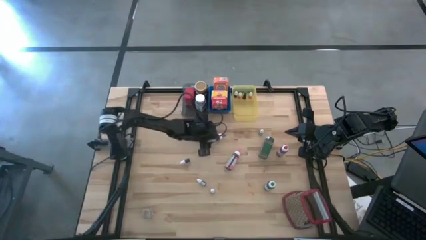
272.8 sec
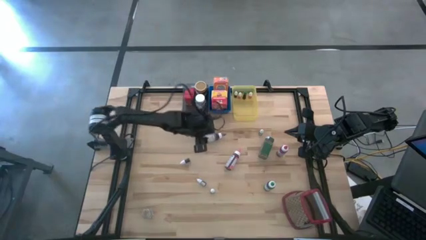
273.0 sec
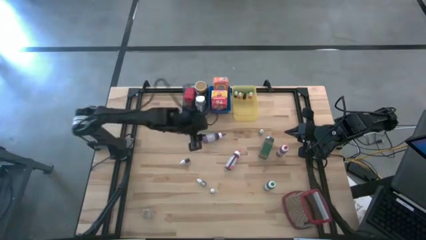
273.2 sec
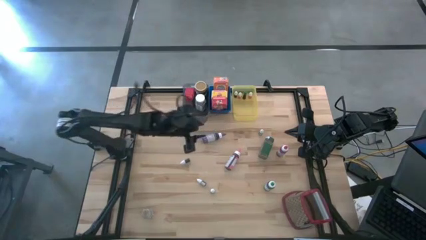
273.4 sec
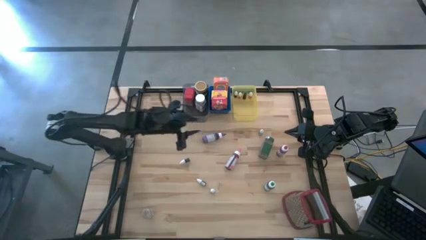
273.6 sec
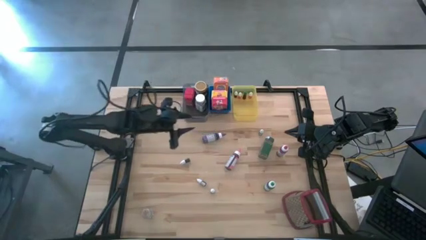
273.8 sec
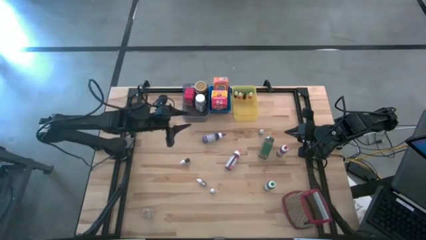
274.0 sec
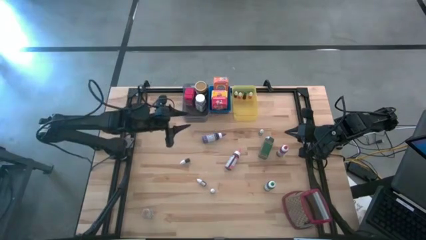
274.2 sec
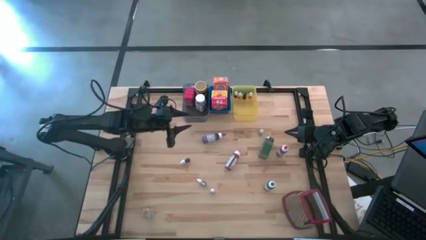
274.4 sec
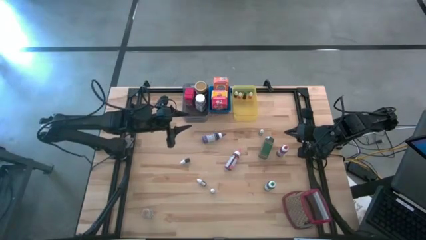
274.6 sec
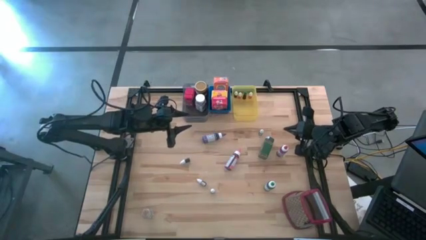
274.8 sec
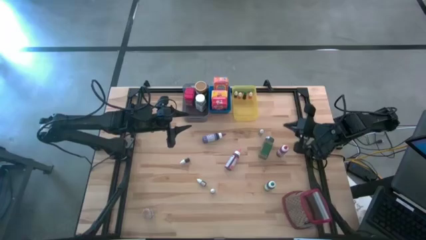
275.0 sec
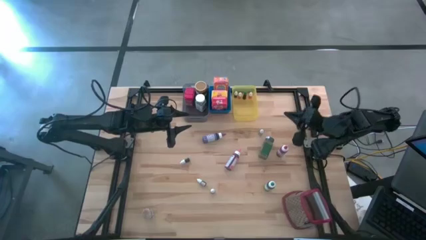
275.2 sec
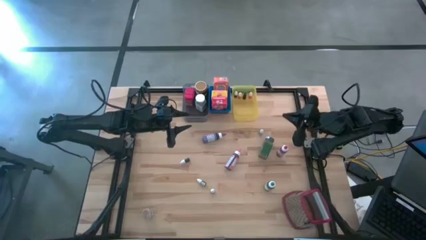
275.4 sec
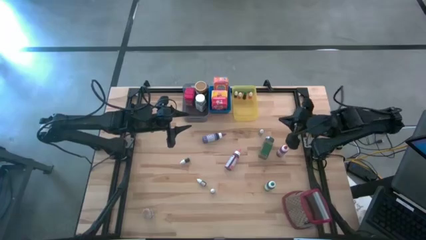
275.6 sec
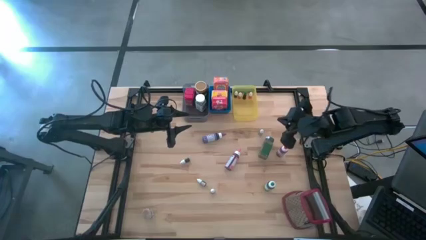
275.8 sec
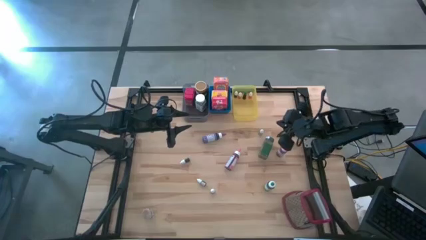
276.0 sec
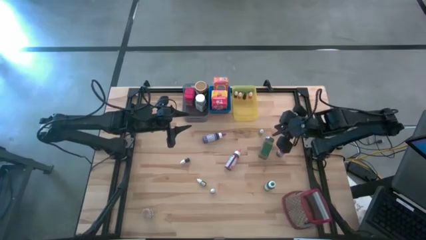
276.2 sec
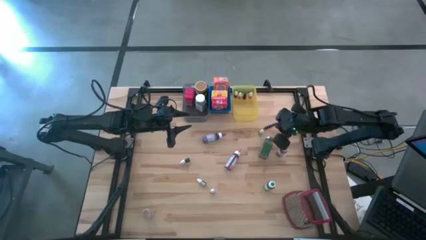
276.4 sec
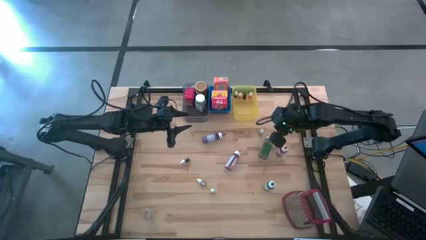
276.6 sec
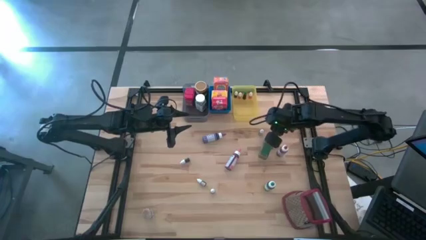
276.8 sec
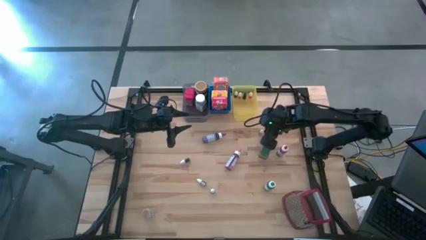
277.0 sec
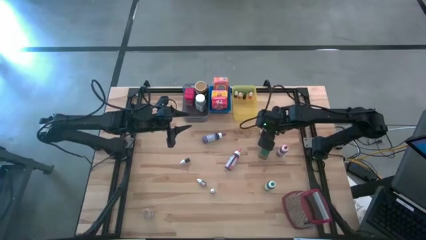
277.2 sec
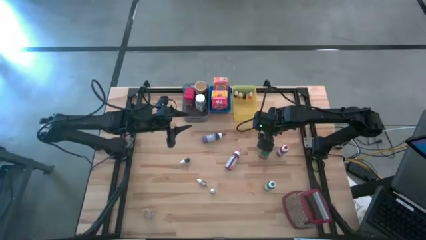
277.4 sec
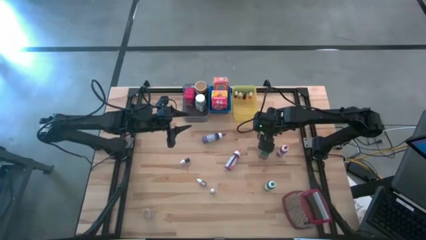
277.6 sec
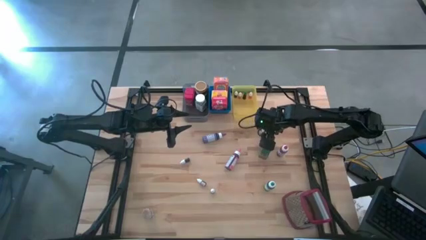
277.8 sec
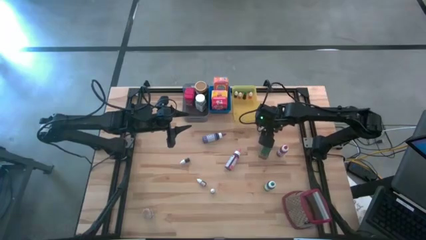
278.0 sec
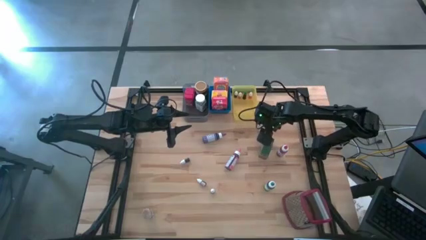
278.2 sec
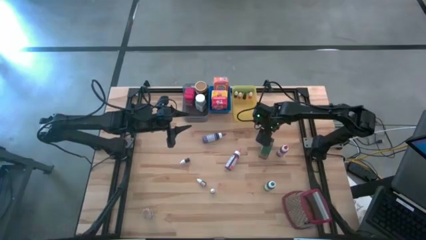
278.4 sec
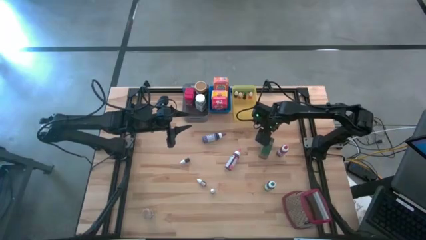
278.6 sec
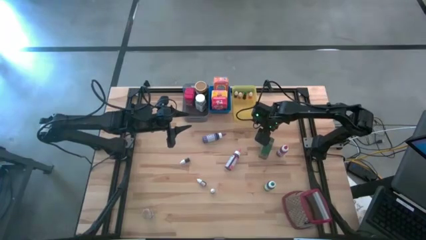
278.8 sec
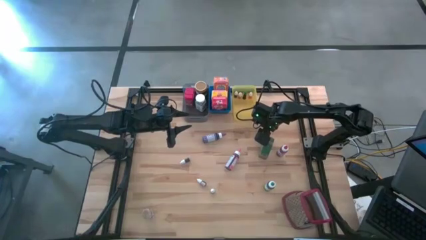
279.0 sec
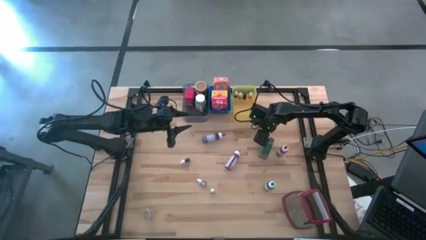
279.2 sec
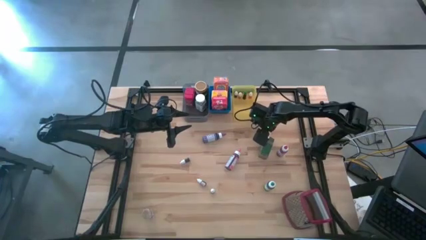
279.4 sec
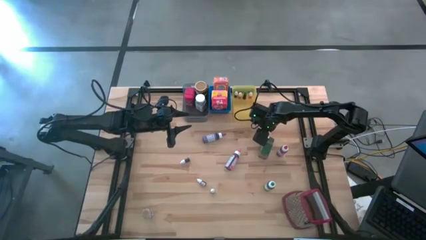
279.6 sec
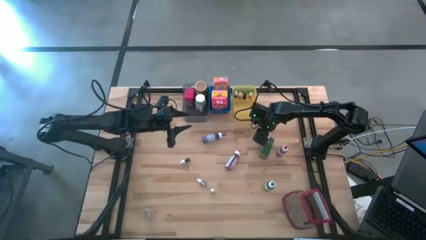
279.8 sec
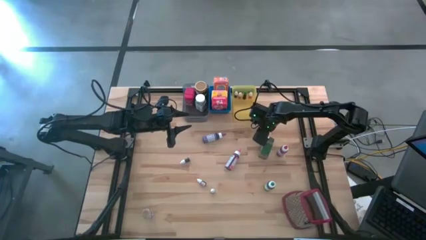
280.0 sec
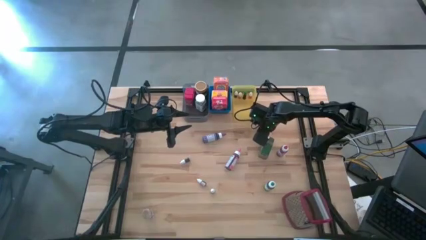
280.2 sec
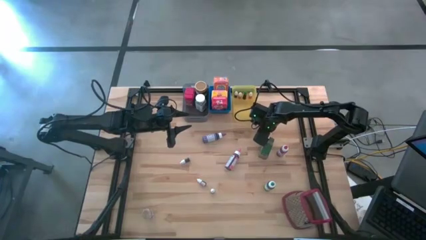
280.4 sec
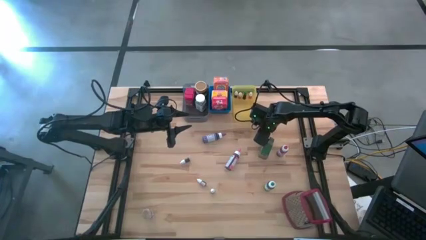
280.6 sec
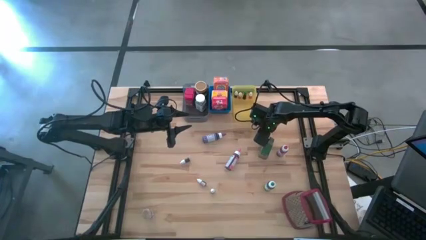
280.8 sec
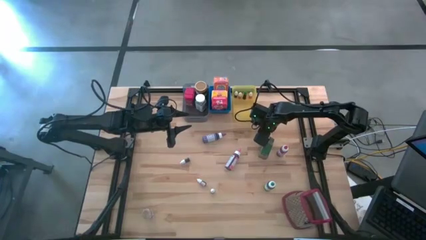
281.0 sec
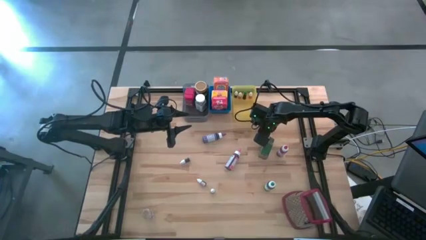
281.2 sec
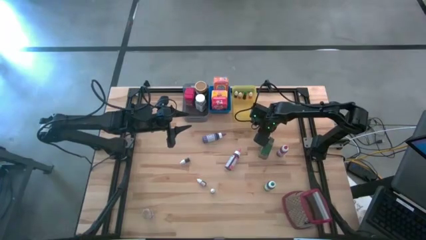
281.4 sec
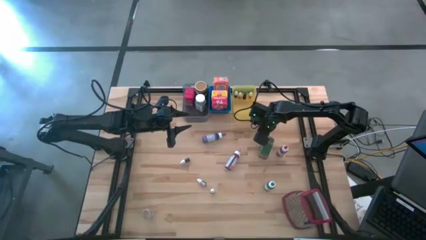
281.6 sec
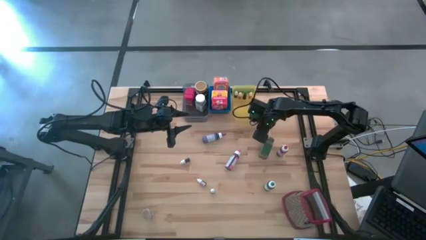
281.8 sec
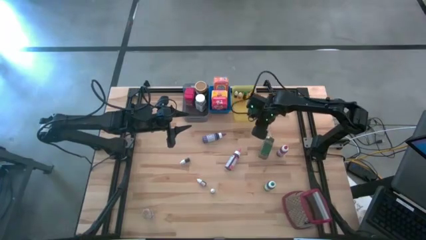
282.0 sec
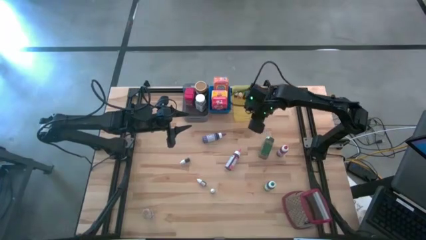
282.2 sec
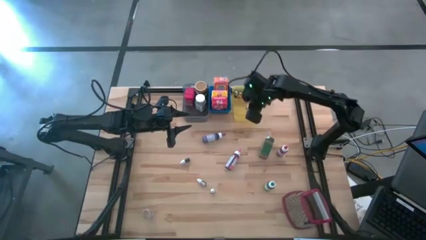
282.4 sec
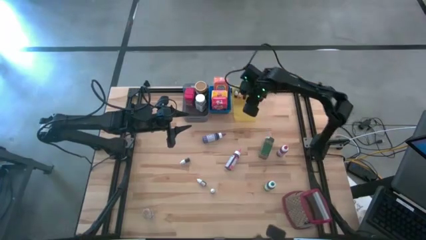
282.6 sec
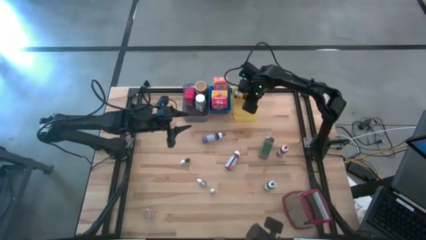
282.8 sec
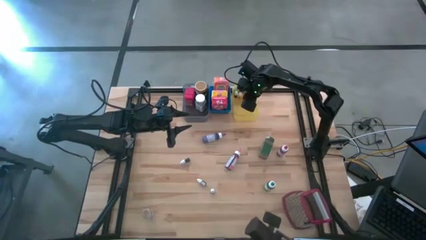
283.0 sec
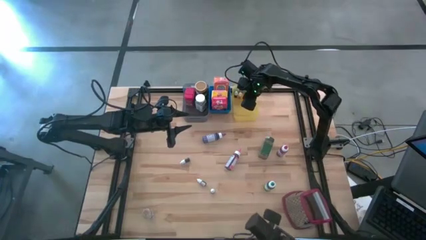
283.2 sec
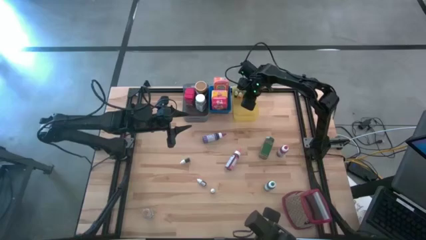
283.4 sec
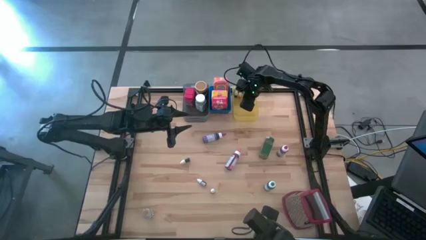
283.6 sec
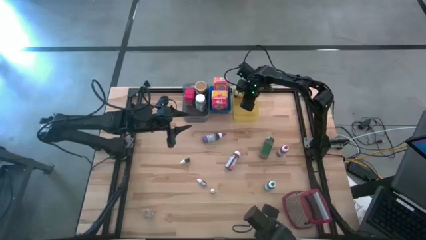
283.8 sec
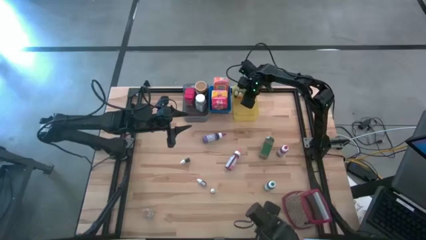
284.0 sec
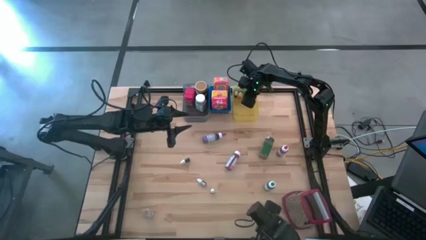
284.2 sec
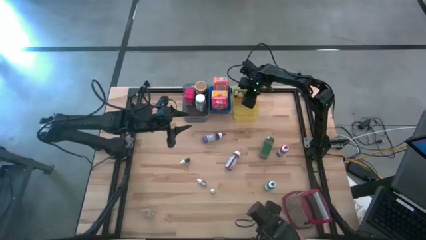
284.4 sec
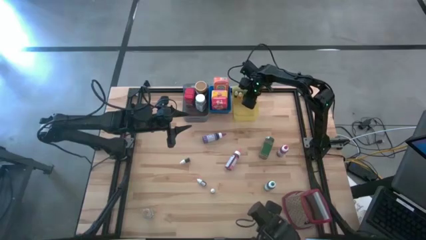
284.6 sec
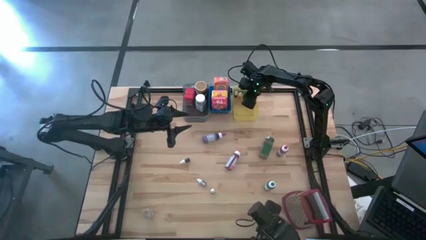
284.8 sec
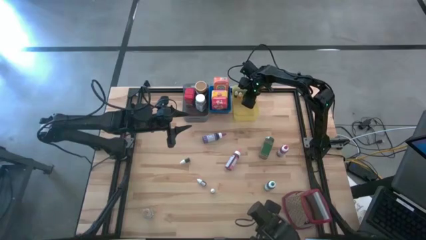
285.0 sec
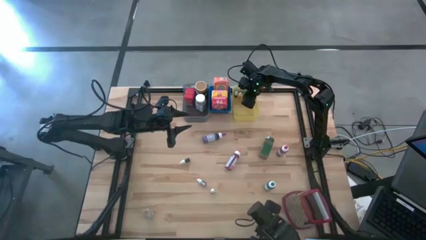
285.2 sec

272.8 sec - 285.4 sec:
Task: Pick & Place Kitchen Items
Put the small green food coloring bottle into the yellow bin

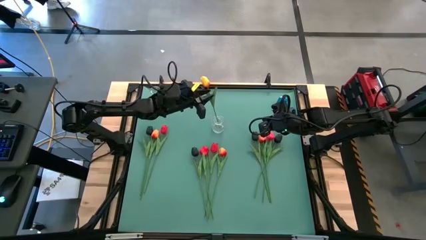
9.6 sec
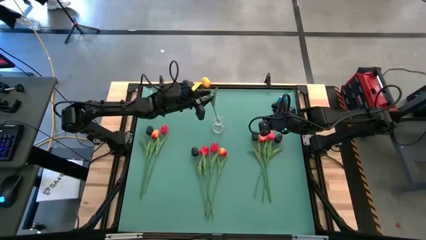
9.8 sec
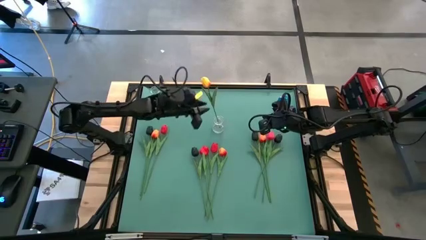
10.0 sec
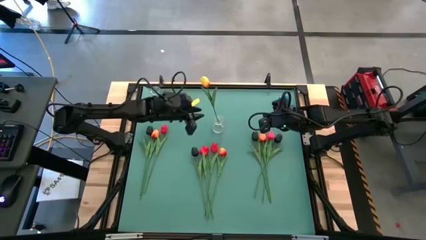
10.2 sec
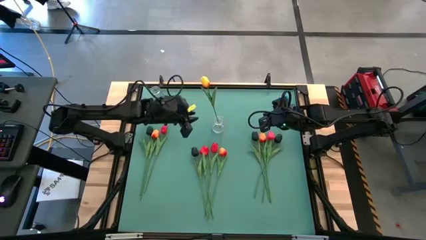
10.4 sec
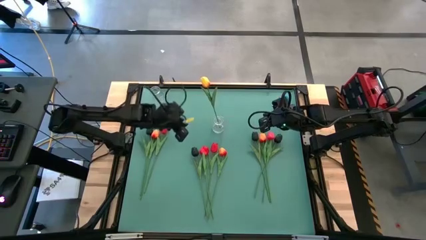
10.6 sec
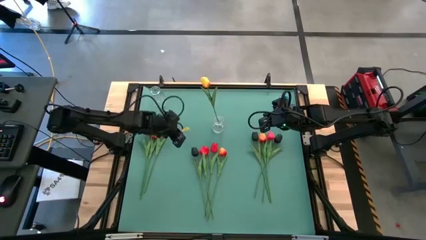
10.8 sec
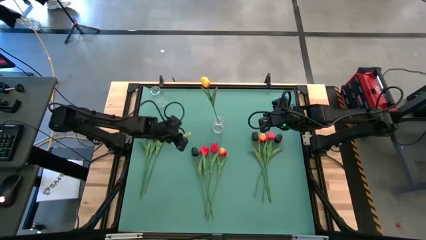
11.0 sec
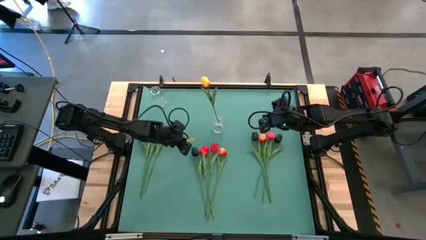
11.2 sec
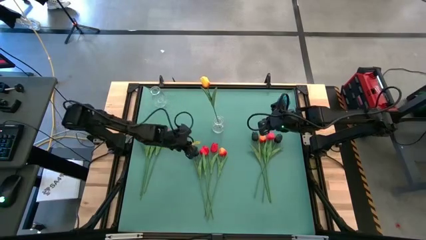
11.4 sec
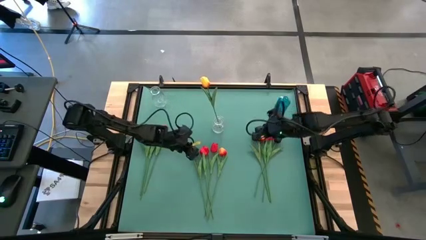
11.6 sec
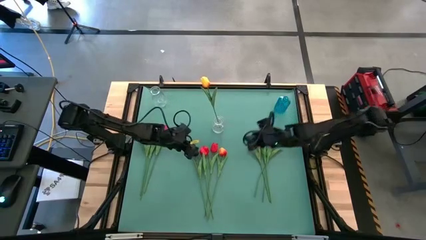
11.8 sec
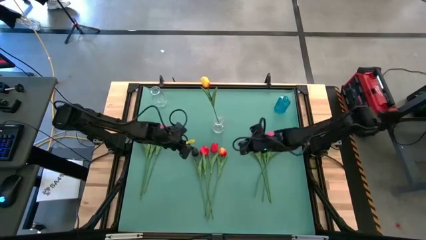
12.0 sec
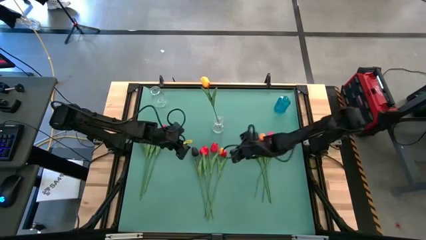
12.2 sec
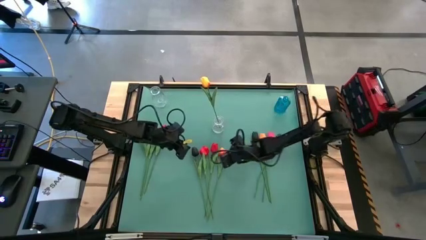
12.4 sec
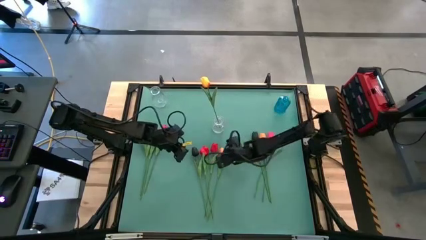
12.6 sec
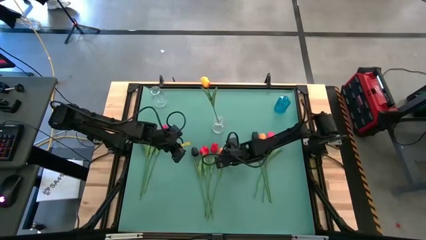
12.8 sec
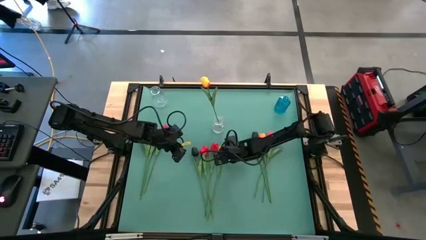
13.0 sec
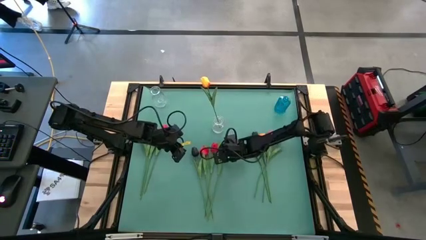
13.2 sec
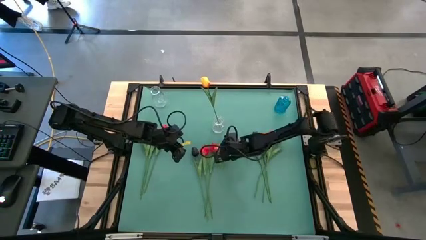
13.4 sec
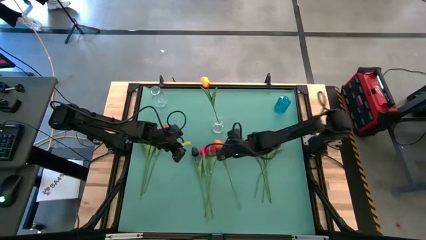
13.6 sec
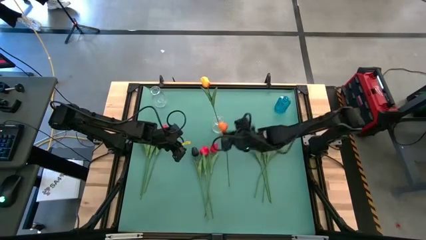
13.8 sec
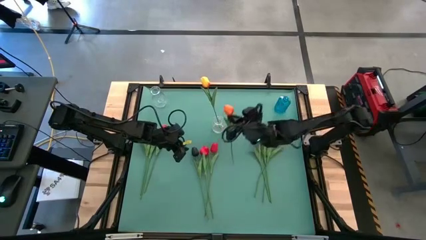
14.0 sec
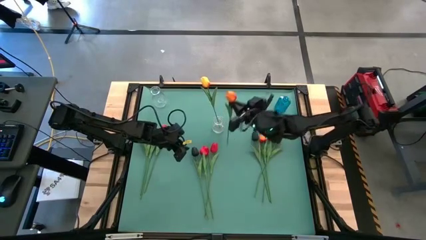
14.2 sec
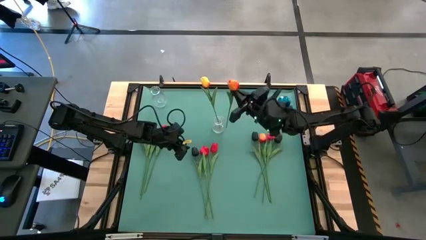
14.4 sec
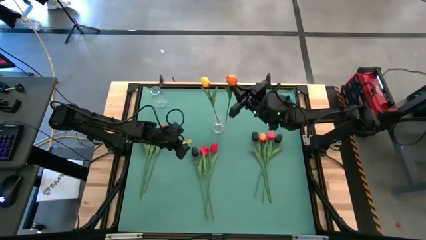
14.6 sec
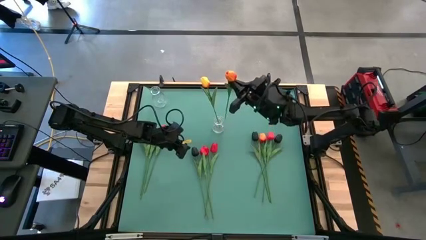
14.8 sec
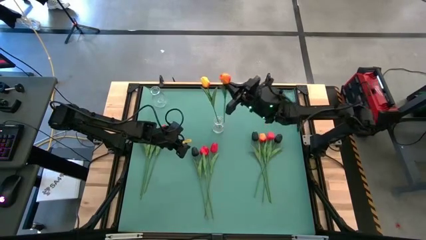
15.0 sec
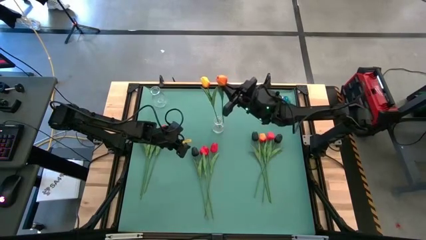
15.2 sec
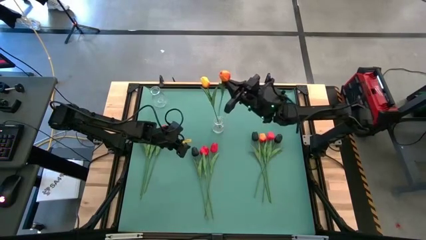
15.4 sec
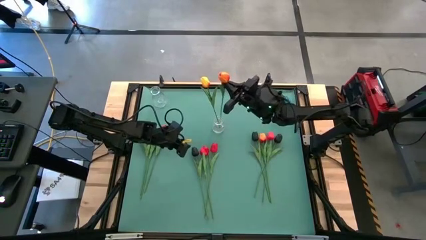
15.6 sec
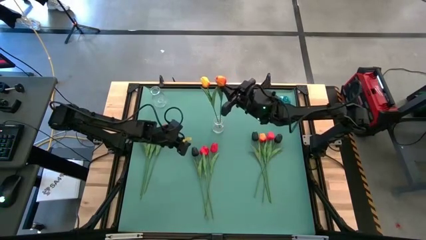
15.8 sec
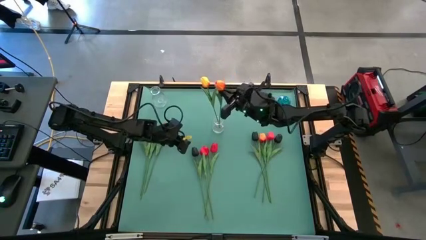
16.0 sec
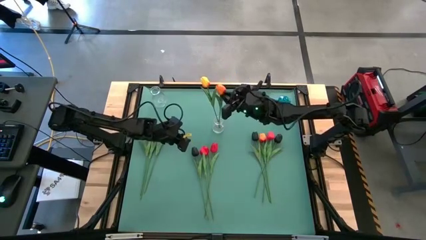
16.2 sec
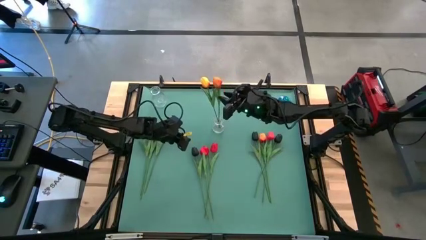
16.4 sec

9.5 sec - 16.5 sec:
Task: Sort flowers into vase by color
Put the orange tulip into the right transparent vase
